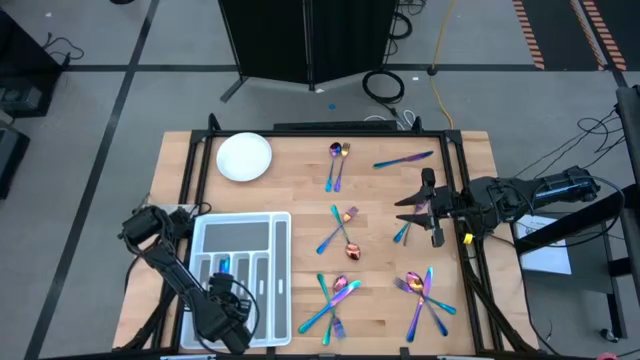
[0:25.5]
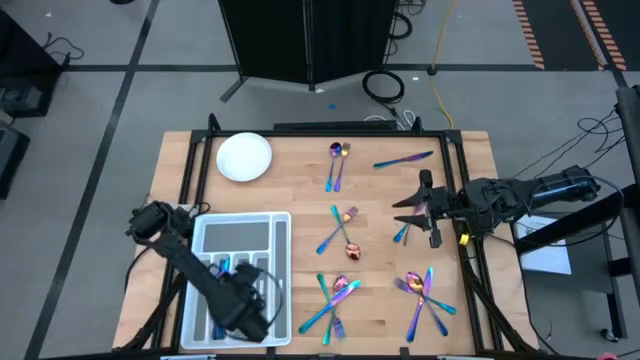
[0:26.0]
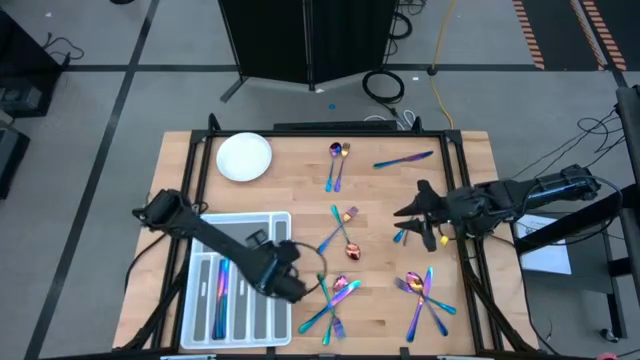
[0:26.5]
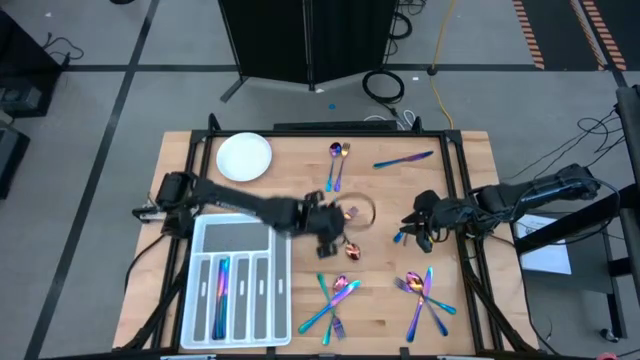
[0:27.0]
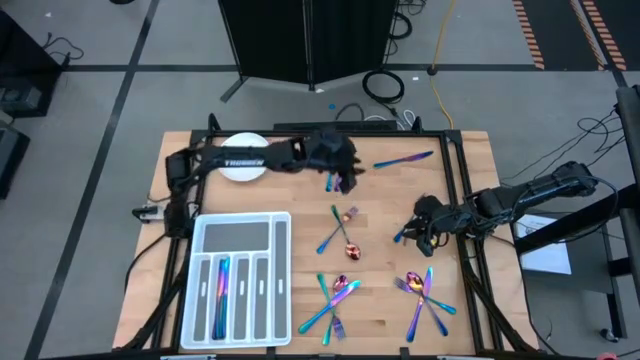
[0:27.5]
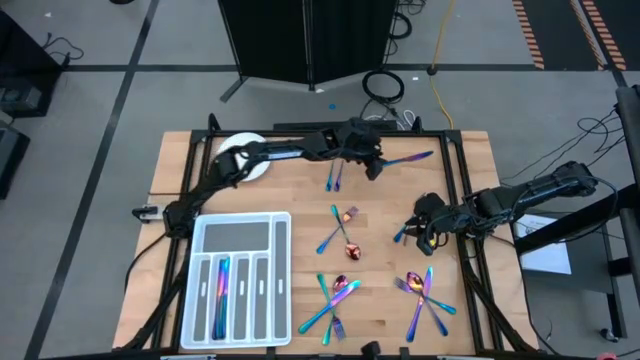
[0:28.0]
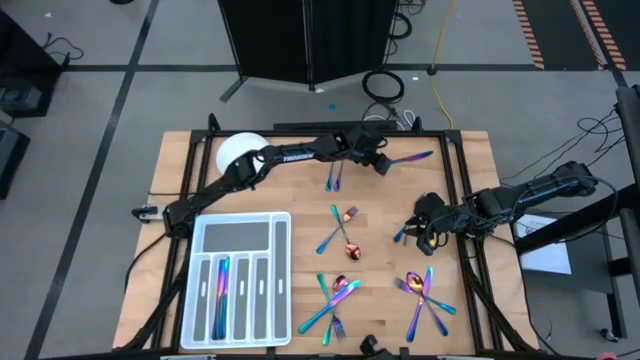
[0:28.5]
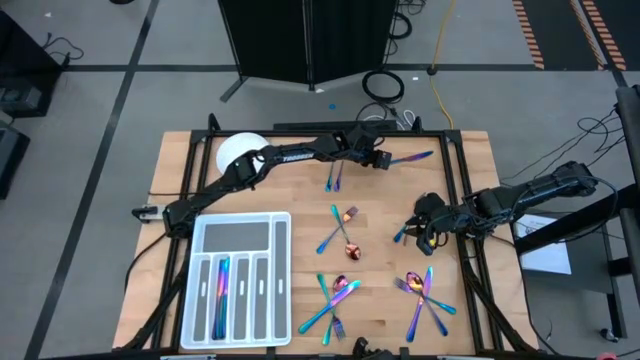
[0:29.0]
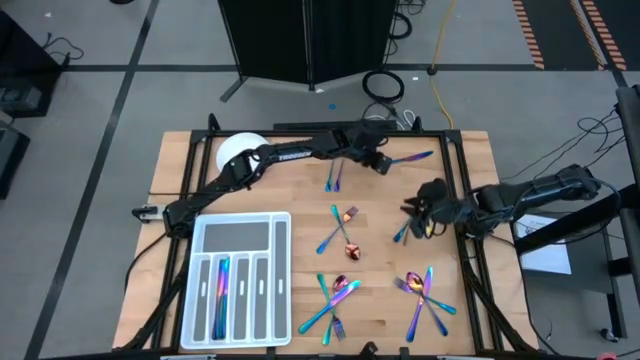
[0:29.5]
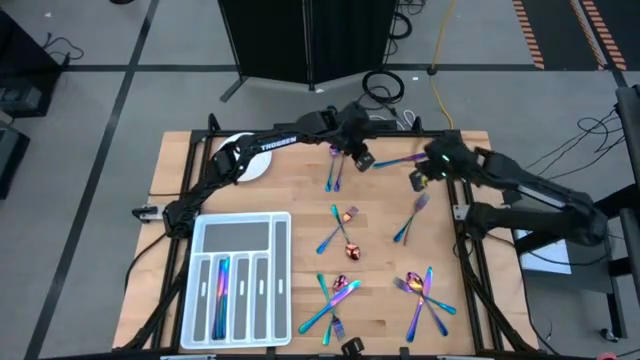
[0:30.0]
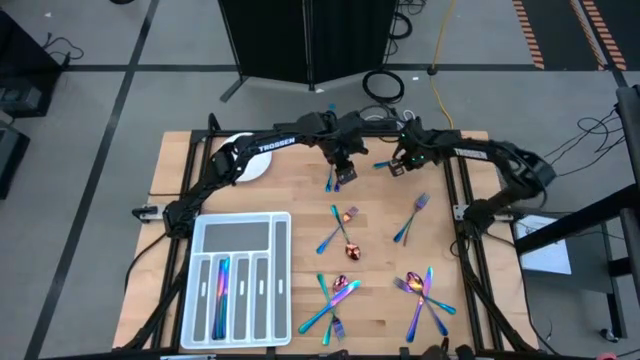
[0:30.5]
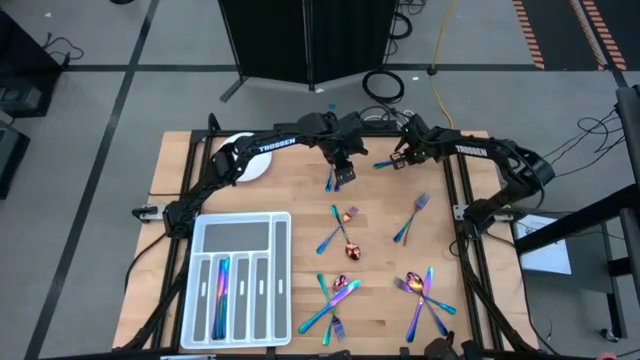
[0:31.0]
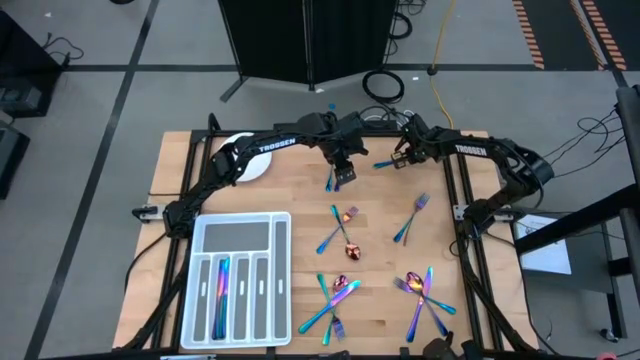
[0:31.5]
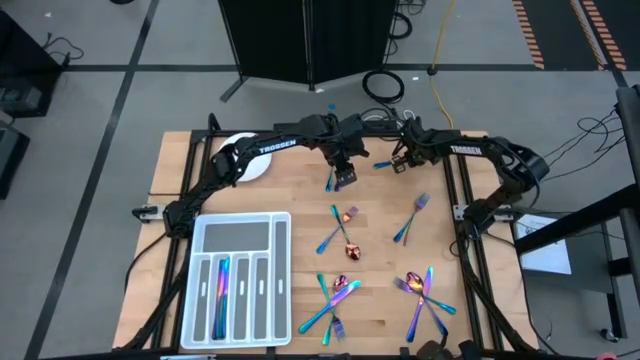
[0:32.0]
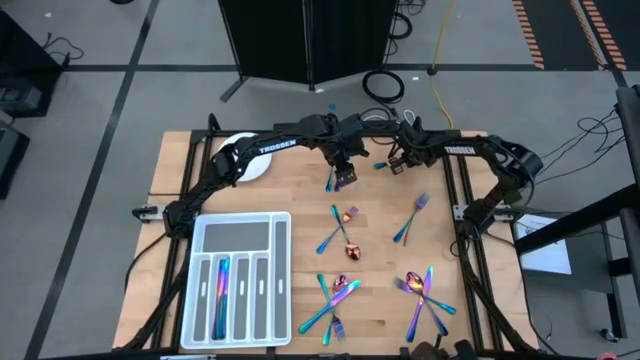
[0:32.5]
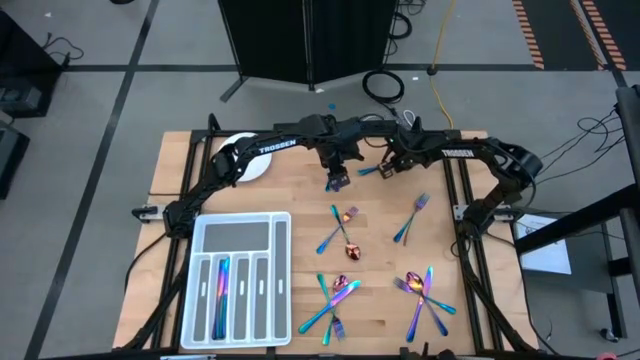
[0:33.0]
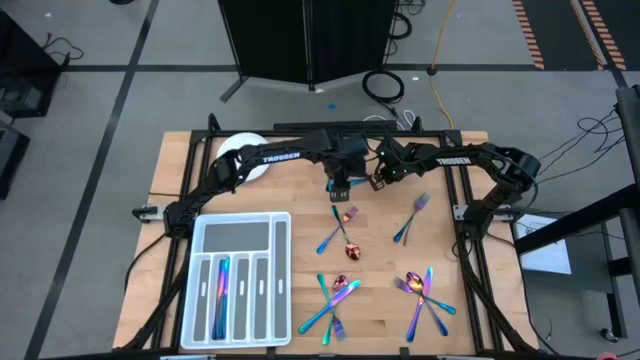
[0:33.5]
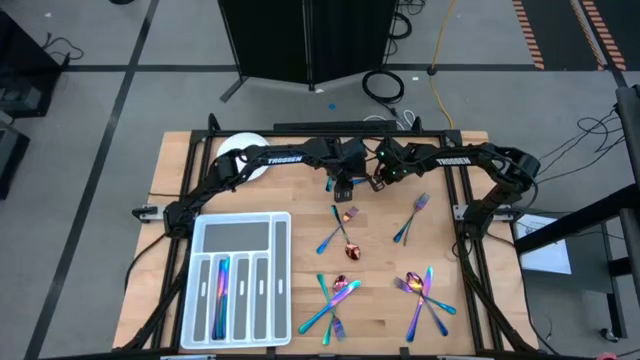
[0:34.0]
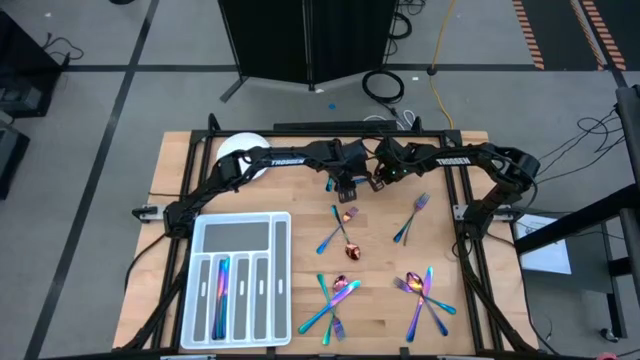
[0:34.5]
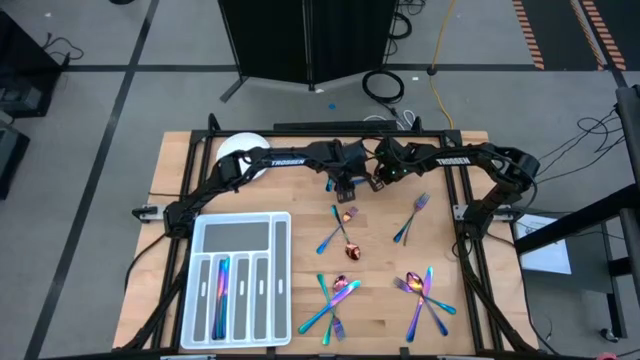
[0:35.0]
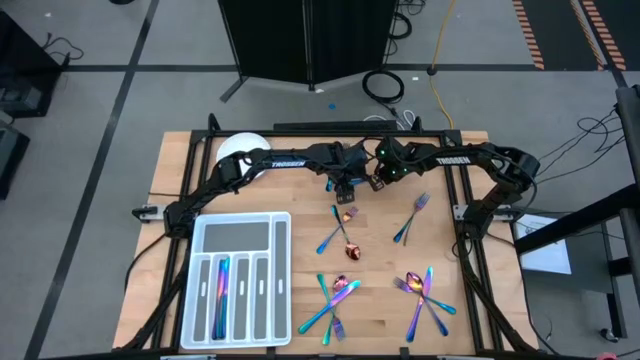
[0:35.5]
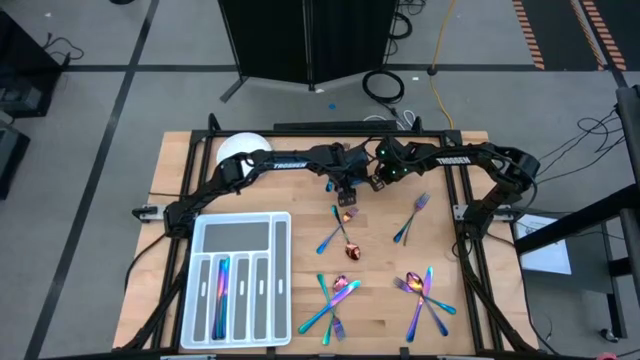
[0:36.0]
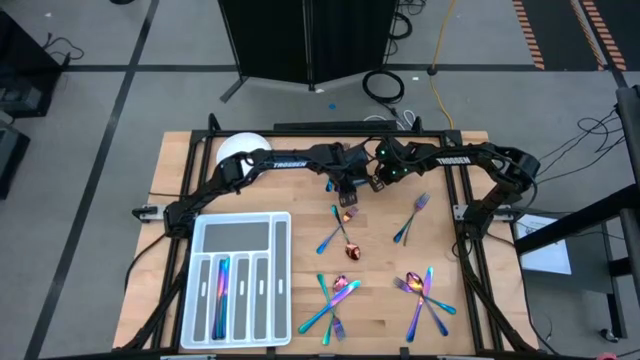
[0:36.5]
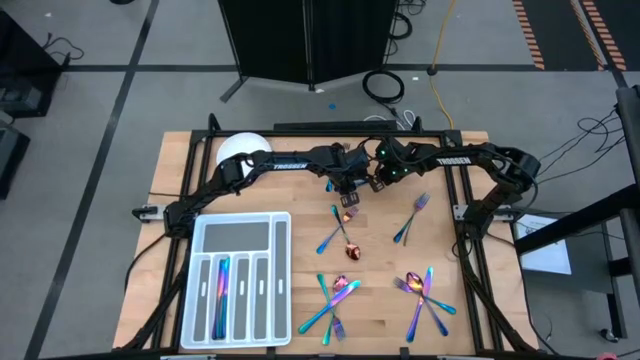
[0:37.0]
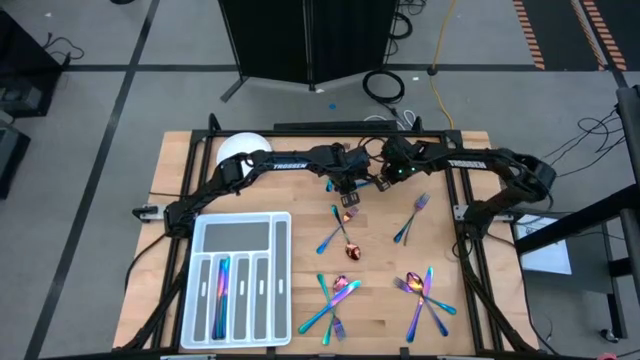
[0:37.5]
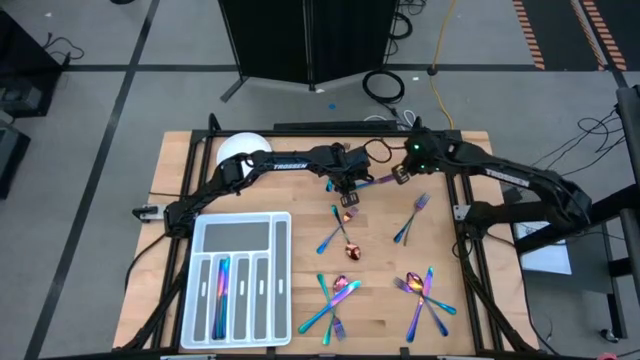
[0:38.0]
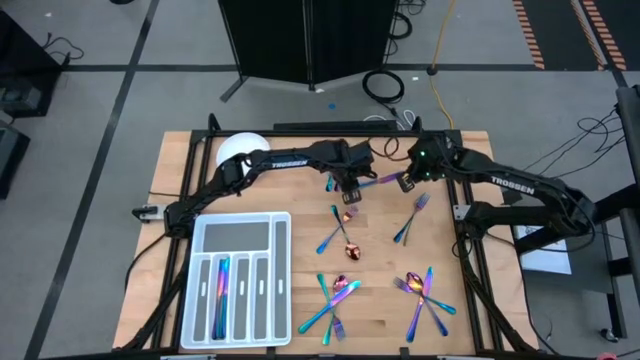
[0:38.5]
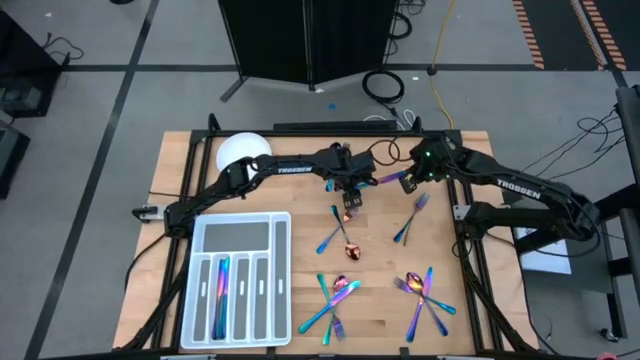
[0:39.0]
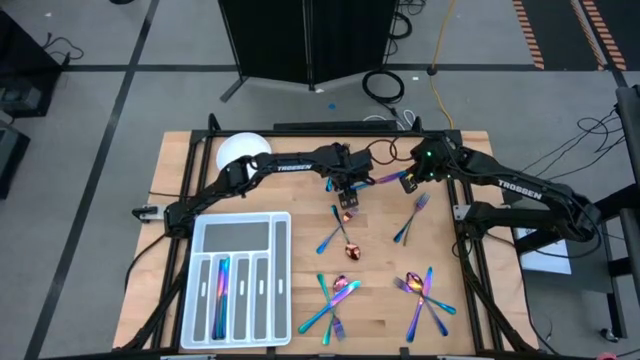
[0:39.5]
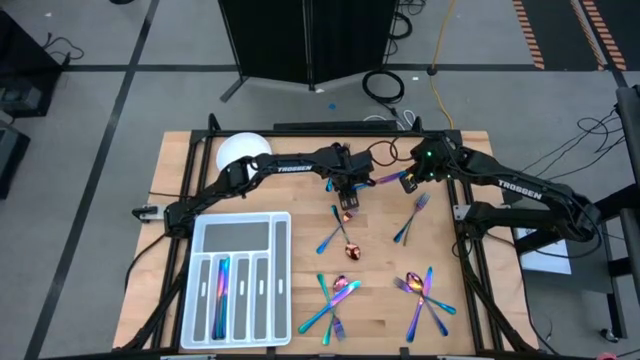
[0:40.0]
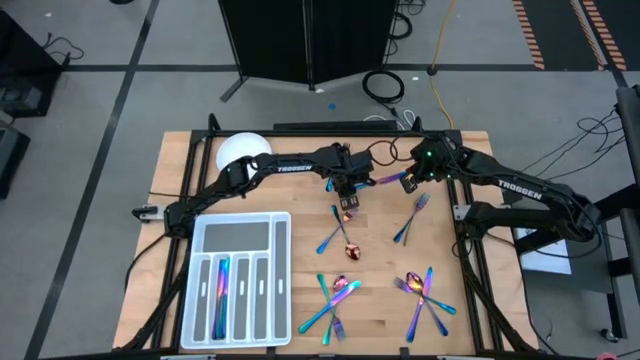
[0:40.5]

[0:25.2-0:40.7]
Task: Sort silverware
Put the iridescent blue knife in the silverware tray

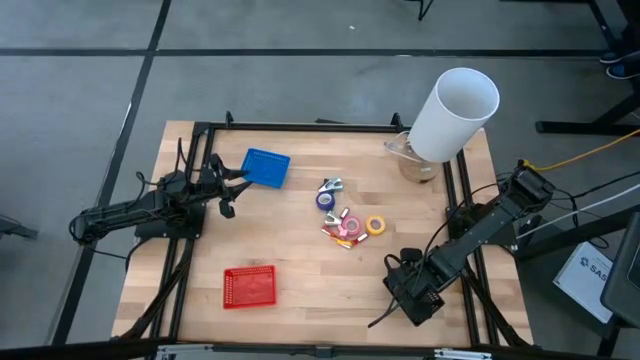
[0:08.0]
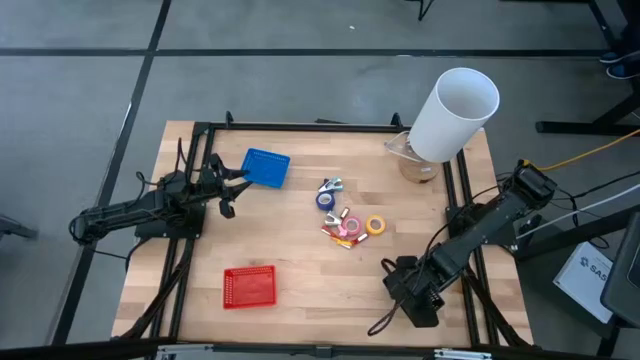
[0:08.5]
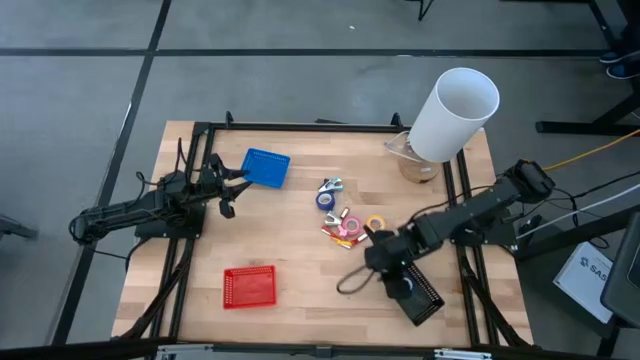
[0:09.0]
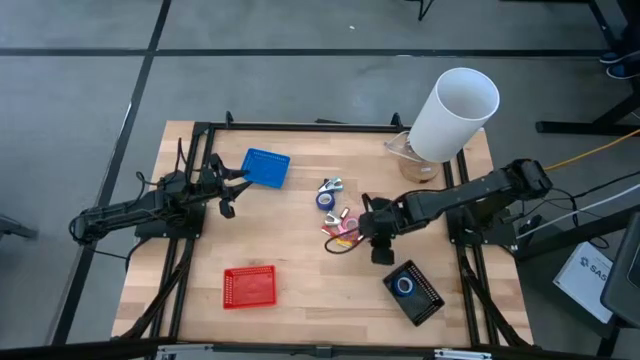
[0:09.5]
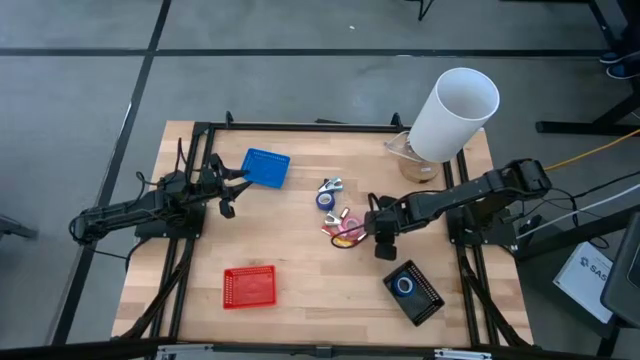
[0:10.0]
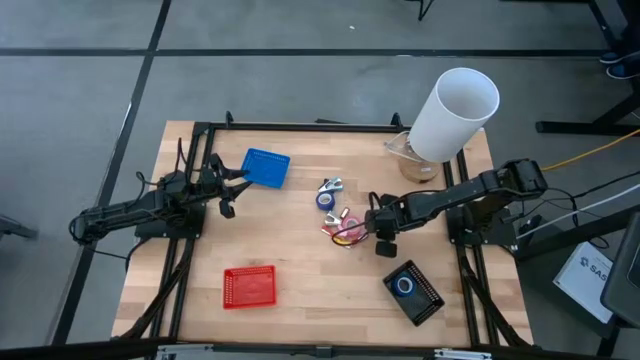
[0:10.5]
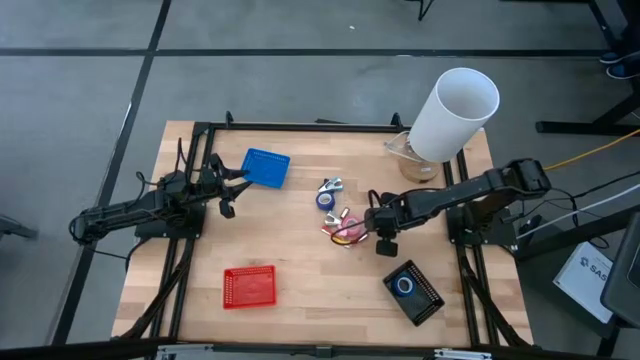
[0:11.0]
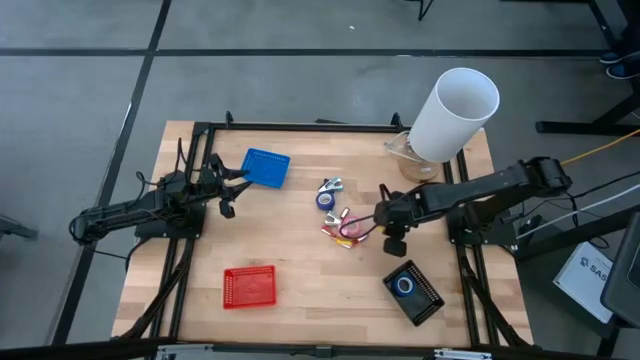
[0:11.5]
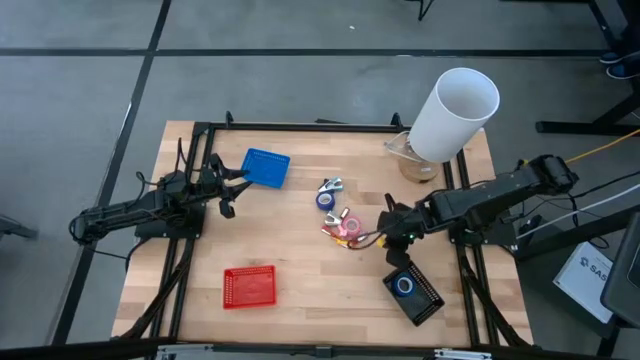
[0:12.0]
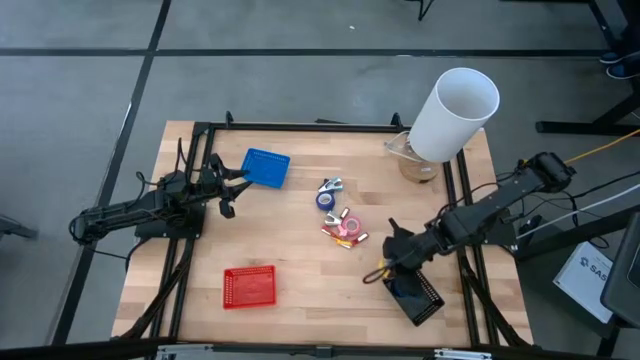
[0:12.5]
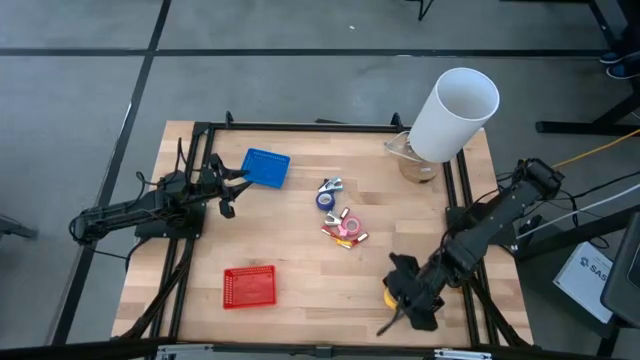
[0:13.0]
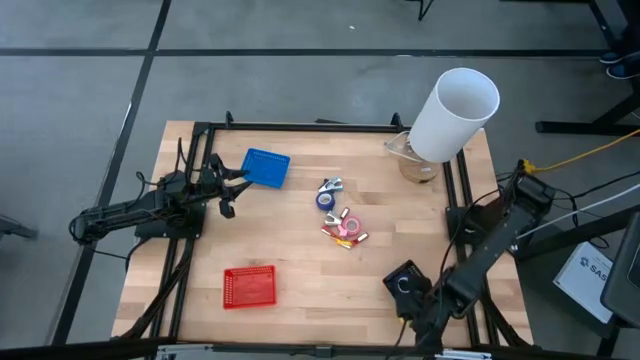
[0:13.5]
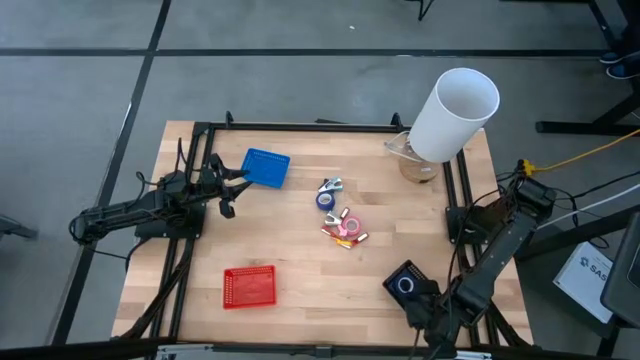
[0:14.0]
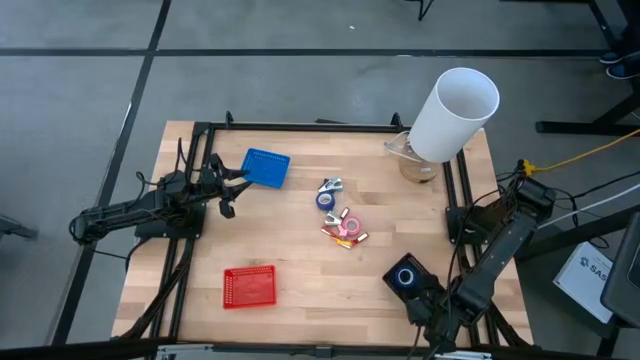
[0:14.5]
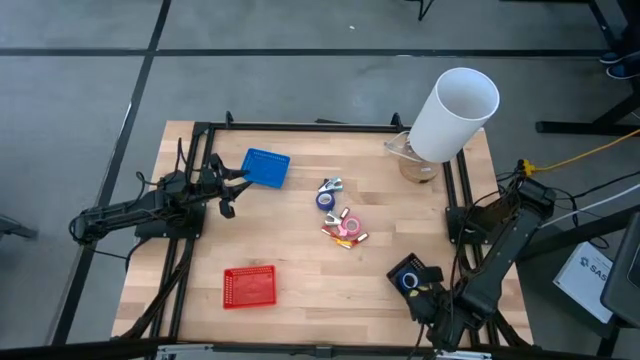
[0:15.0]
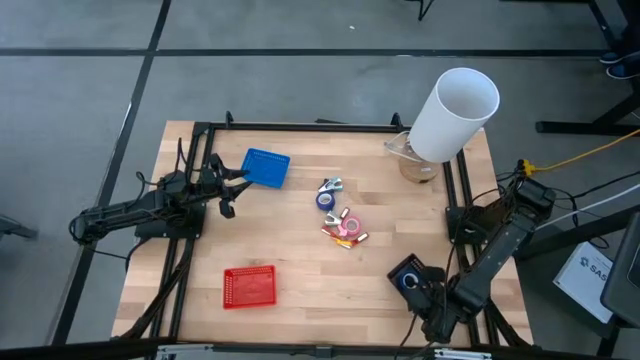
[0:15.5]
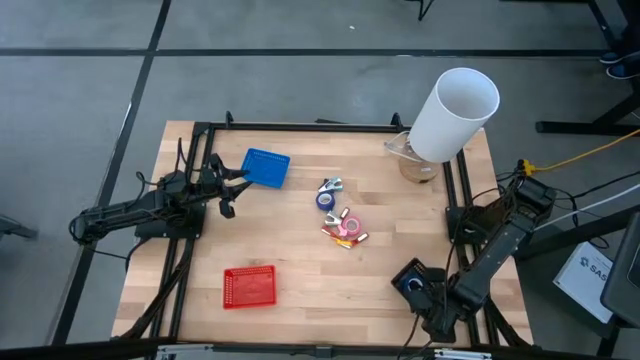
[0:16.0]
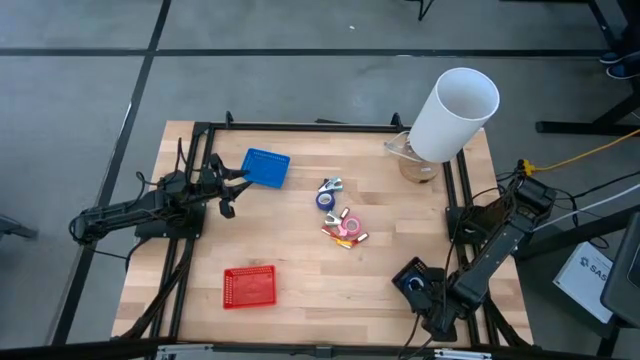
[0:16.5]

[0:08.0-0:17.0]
Task: Pick and place Stapler, Stapler remover, tape
Put the yellow tape into the black bin
